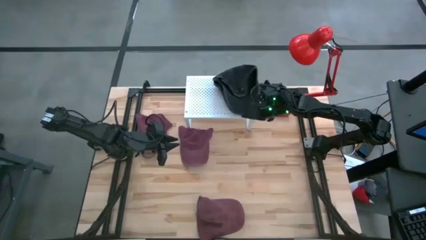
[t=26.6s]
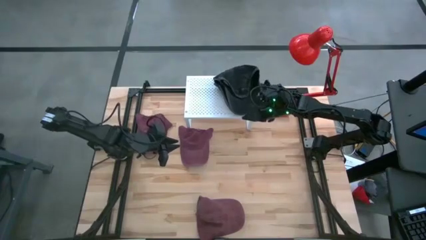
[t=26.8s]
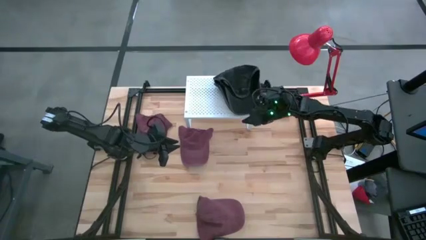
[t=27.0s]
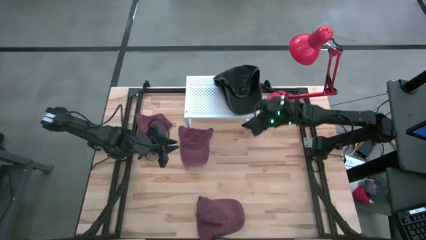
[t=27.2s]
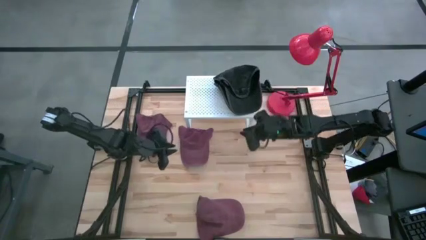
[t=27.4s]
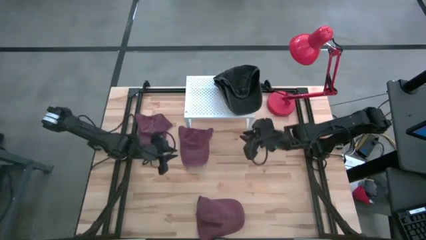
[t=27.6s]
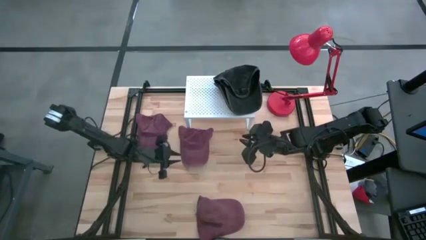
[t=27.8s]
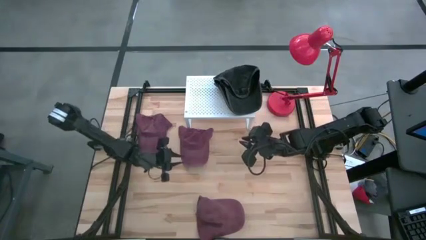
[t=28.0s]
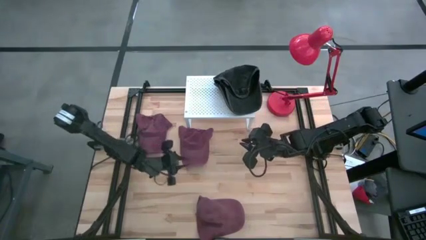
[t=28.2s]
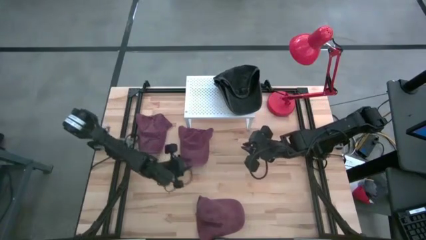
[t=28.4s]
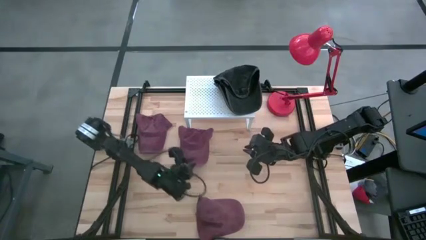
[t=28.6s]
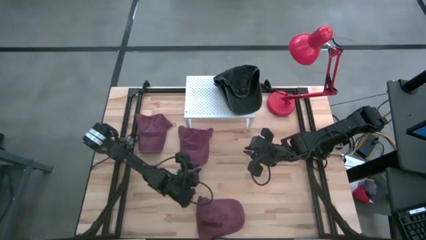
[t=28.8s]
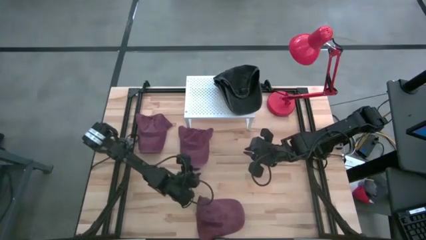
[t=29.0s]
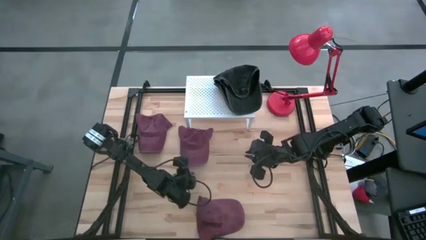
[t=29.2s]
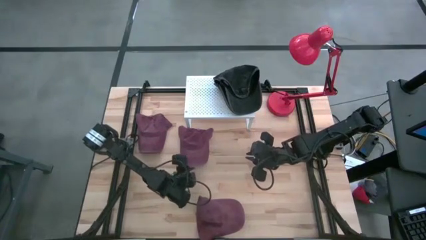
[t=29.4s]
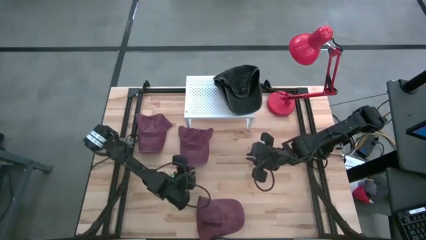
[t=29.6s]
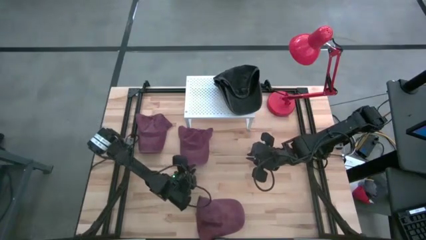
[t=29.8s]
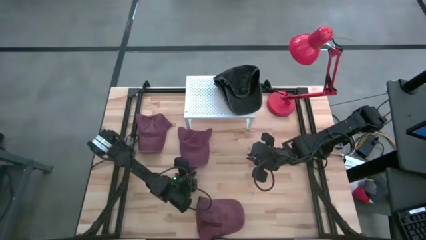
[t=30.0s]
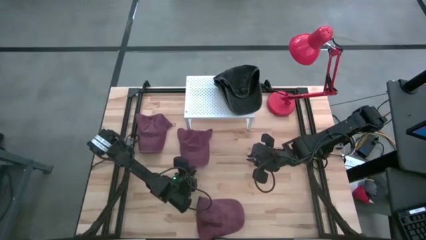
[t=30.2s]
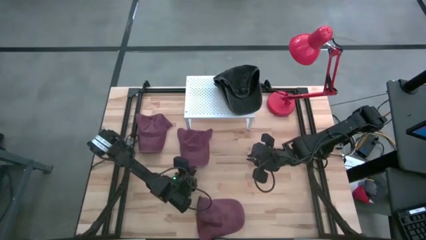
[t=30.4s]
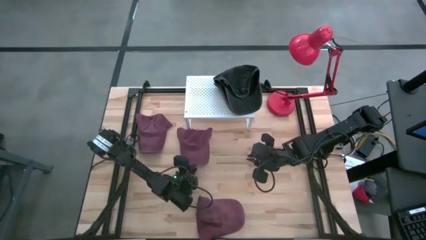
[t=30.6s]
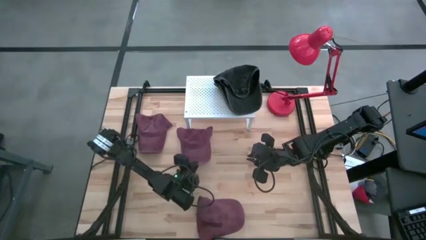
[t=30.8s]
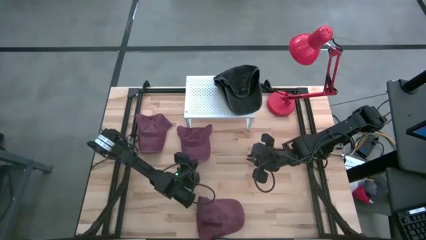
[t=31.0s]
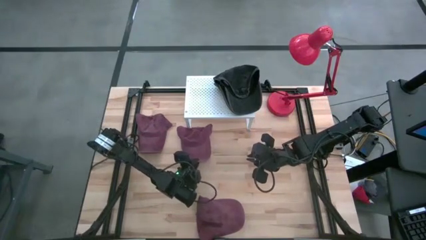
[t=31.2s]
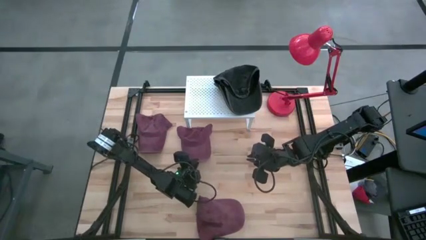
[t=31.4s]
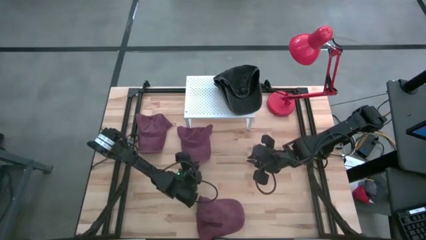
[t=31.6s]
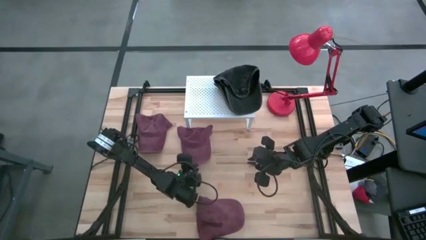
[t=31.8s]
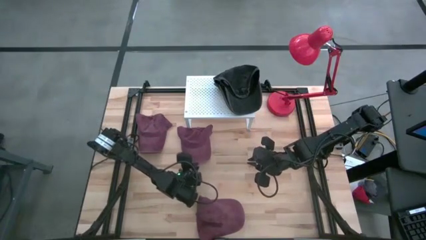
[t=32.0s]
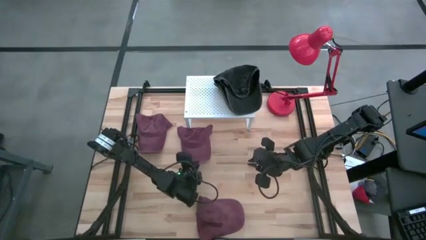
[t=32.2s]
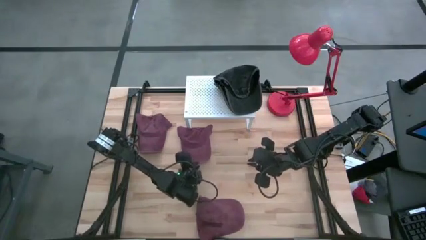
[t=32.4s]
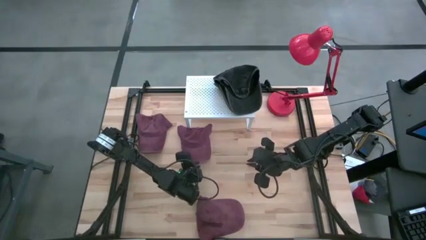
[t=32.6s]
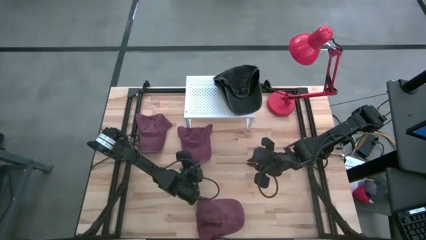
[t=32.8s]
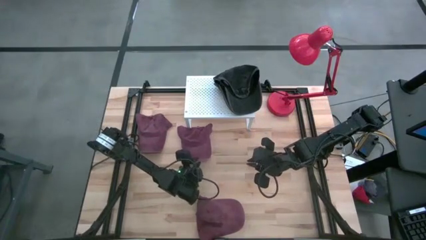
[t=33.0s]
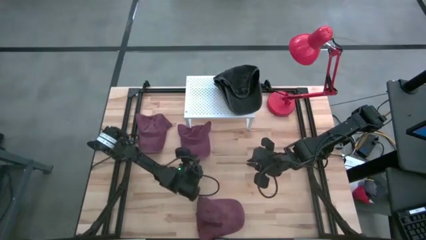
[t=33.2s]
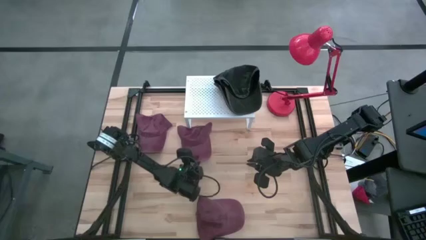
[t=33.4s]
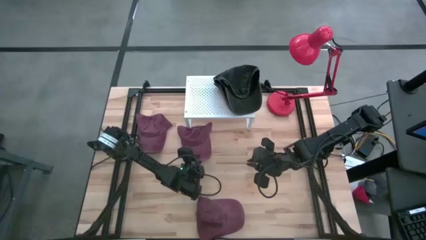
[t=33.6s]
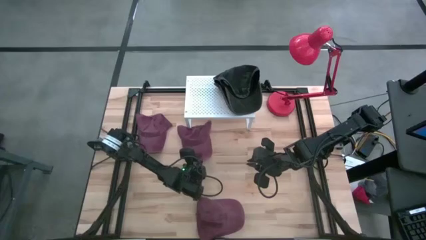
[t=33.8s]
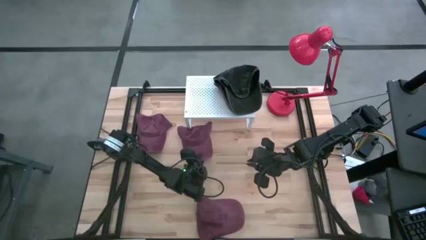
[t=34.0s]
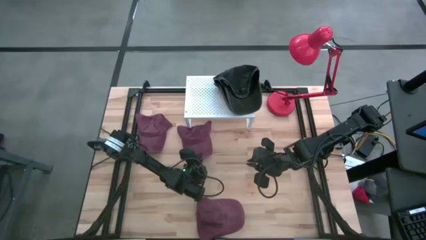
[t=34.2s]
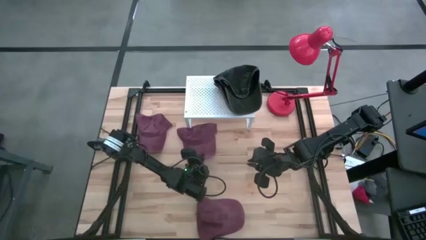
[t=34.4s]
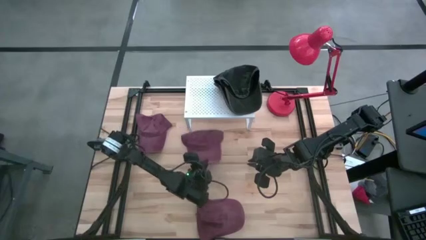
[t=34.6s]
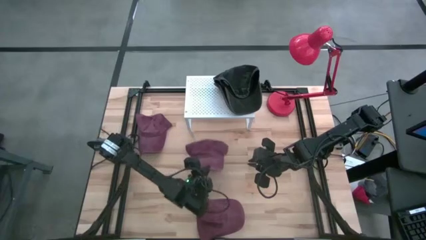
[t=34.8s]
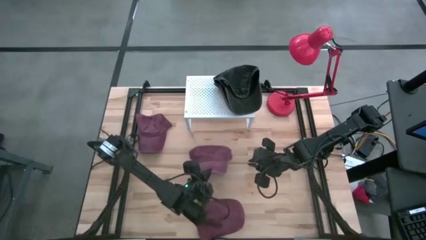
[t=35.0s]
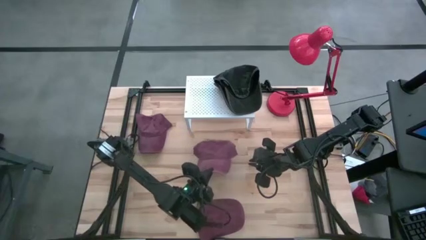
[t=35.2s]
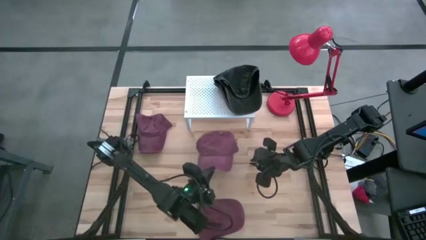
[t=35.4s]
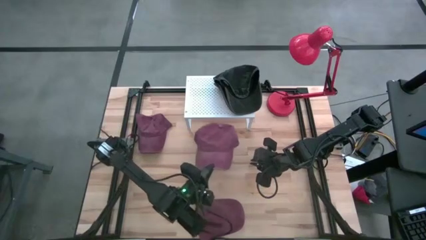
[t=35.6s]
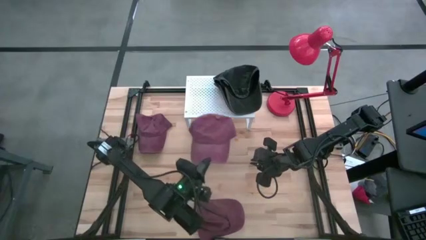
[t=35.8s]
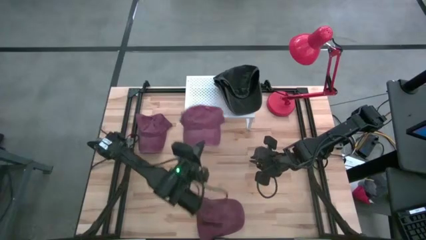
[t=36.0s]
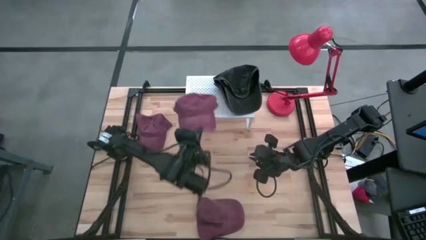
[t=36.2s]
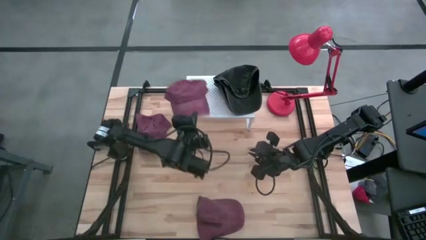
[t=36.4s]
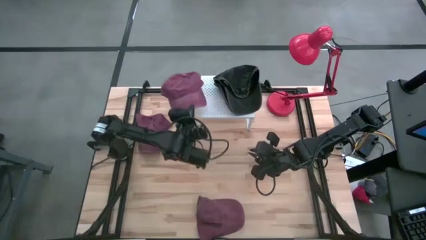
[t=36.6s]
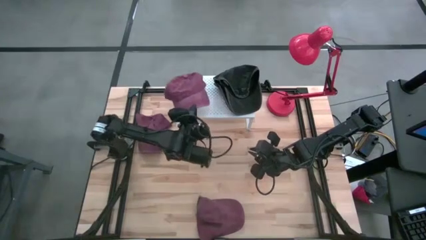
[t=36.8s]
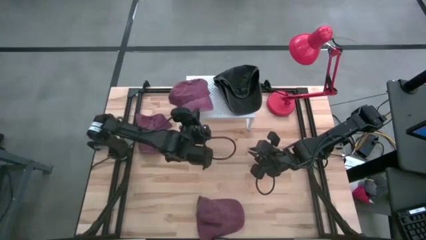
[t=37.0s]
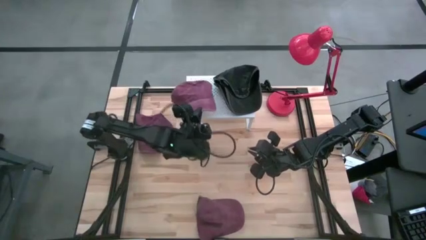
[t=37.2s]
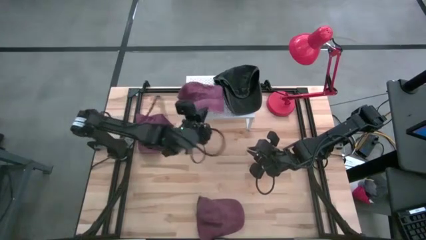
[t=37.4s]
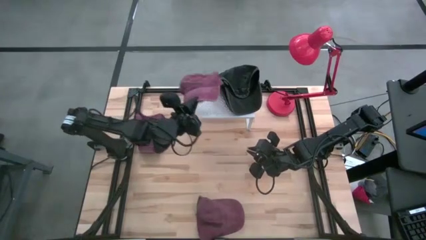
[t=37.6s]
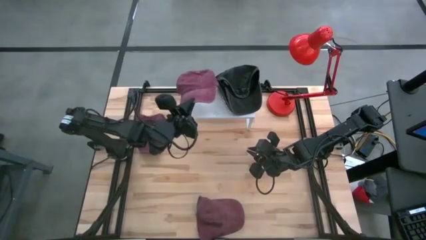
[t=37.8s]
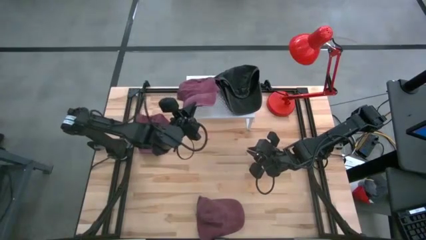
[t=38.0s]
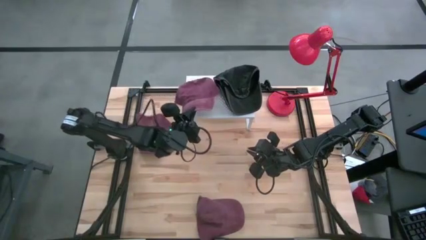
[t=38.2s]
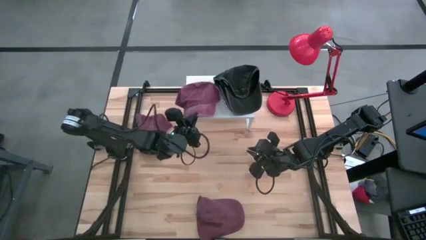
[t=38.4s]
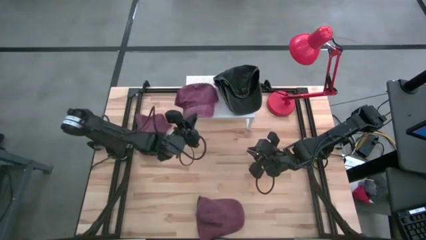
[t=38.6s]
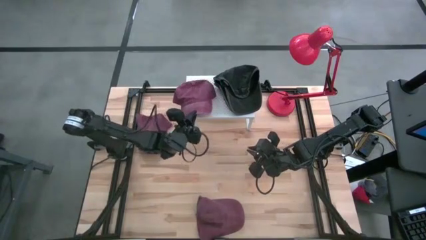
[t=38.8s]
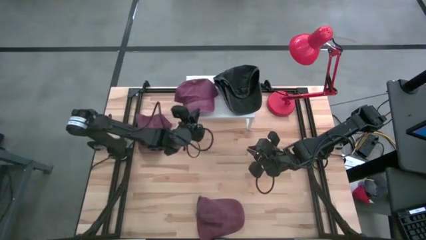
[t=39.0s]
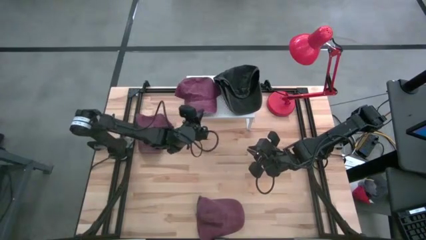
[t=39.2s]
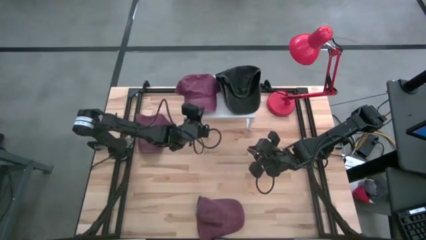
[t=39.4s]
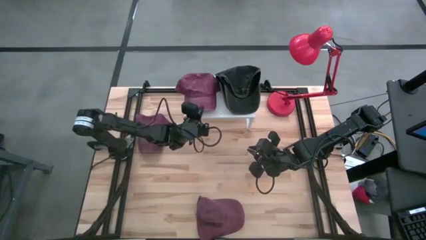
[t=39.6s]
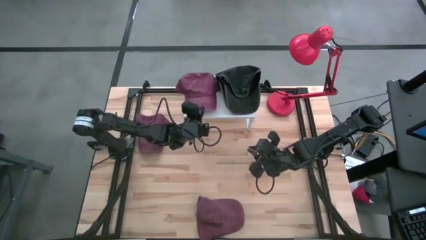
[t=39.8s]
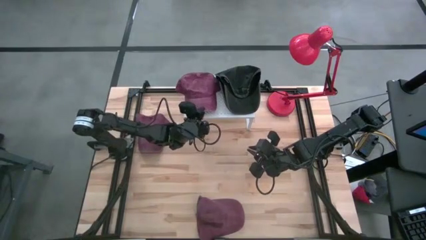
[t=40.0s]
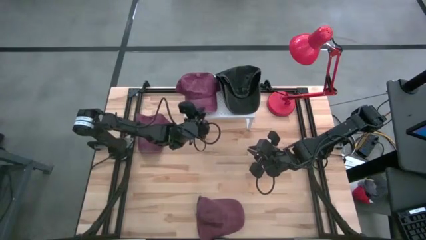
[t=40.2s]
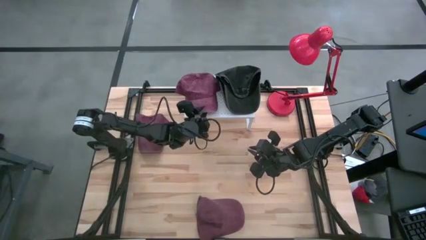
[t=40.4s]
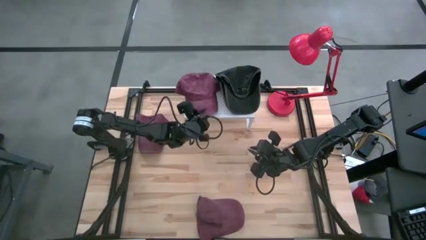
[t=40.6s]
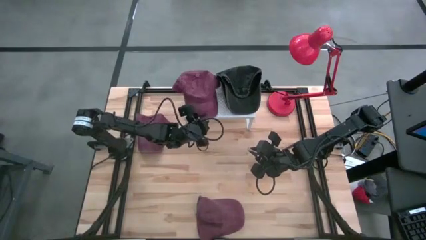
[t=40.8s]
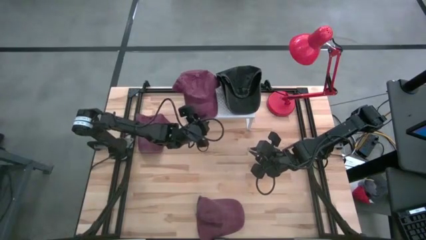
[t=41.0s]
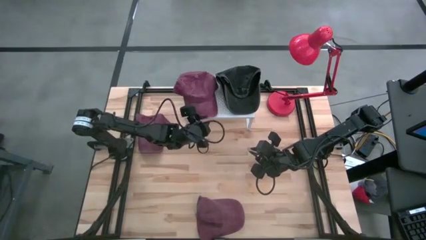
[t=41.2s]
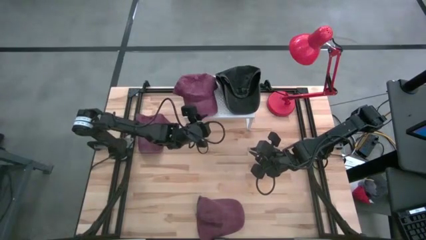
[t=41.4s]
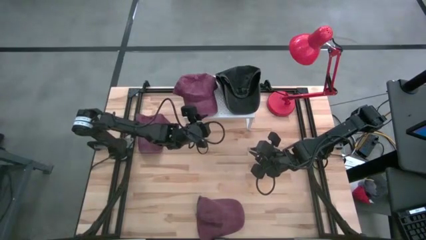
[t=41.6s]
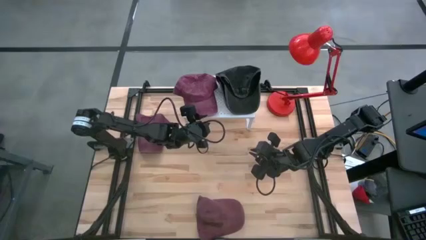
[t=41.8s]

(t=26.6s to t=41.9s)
Task: Pick & Place hat
Put the top right red cap on the shelf
